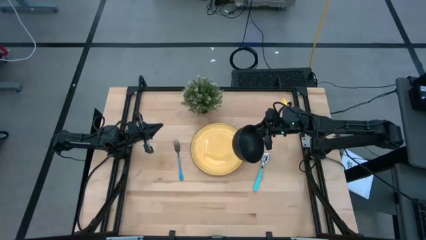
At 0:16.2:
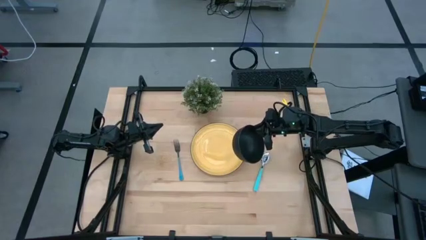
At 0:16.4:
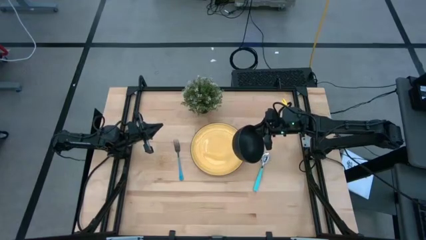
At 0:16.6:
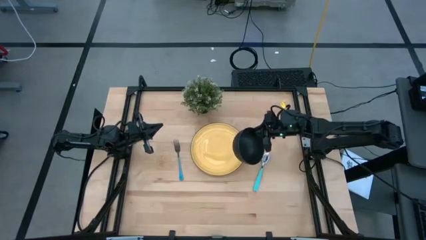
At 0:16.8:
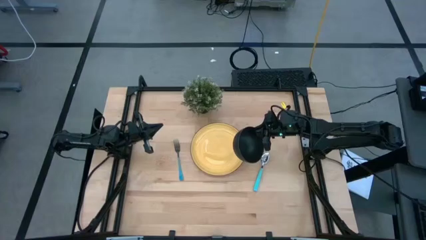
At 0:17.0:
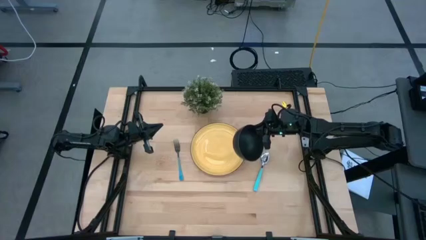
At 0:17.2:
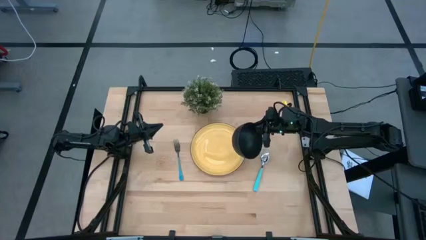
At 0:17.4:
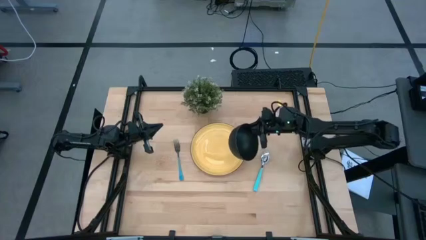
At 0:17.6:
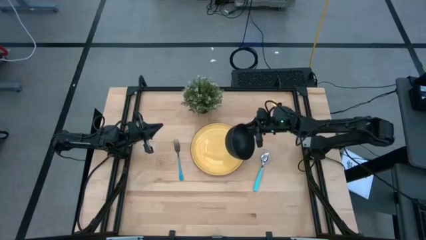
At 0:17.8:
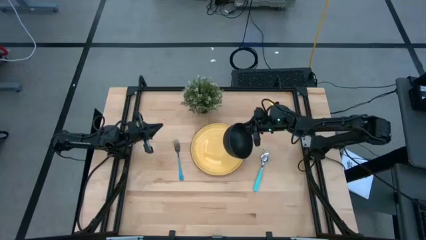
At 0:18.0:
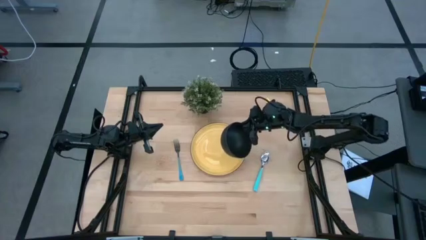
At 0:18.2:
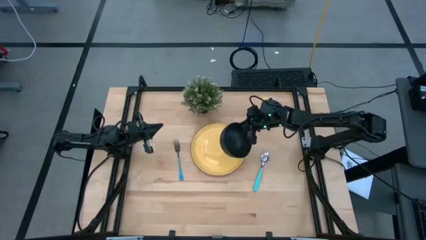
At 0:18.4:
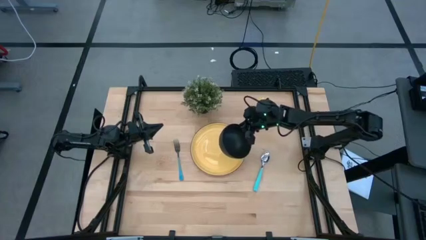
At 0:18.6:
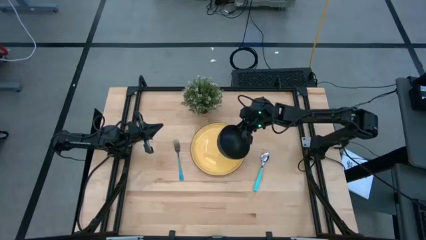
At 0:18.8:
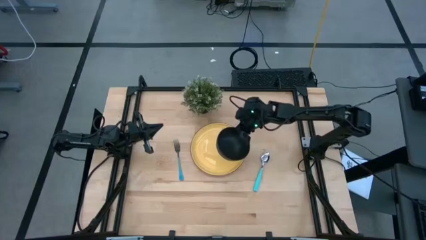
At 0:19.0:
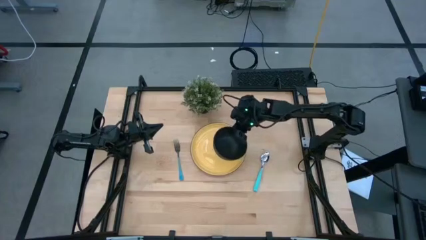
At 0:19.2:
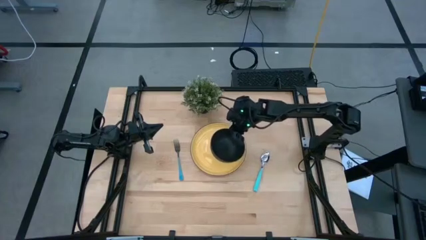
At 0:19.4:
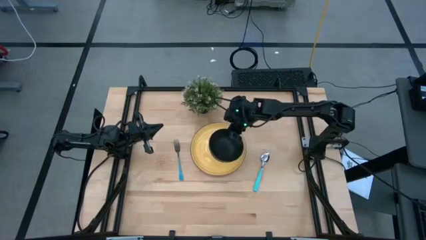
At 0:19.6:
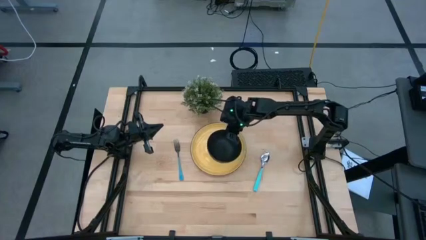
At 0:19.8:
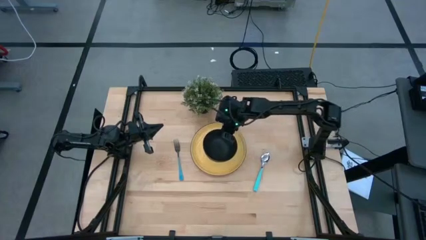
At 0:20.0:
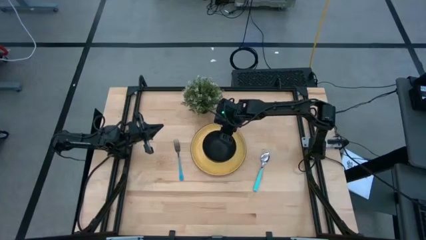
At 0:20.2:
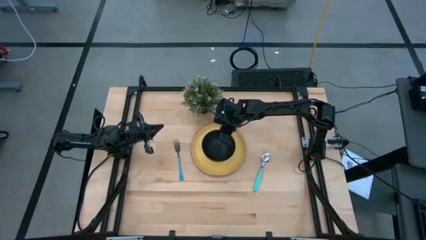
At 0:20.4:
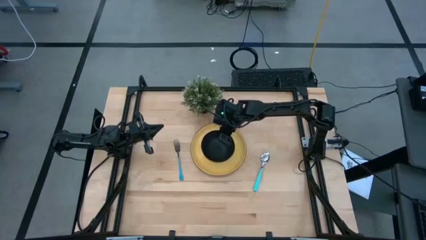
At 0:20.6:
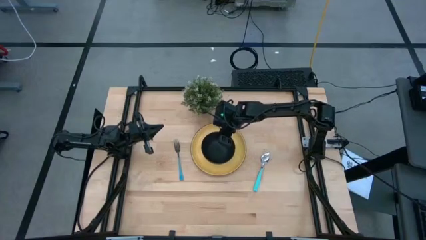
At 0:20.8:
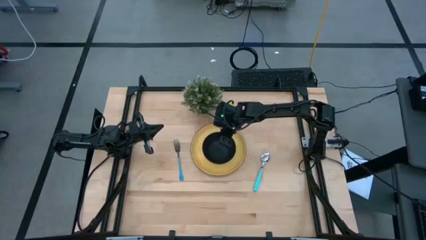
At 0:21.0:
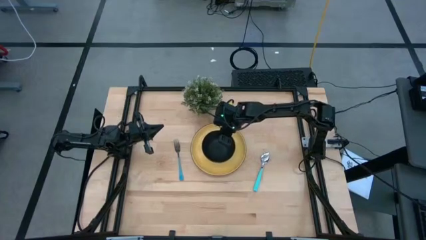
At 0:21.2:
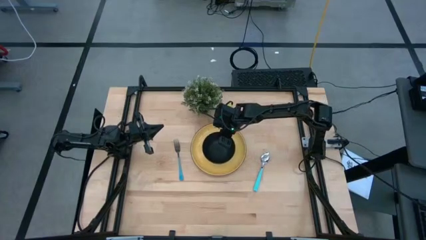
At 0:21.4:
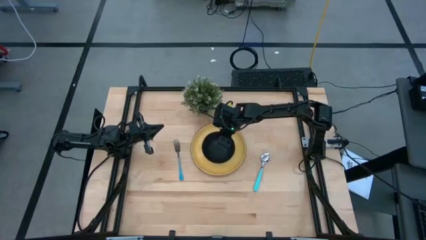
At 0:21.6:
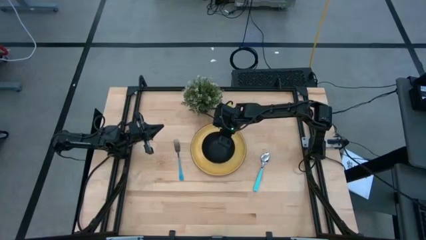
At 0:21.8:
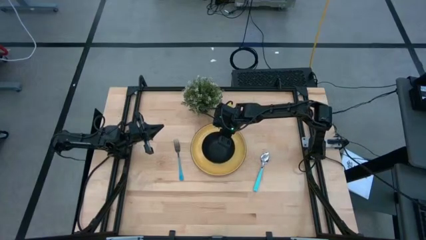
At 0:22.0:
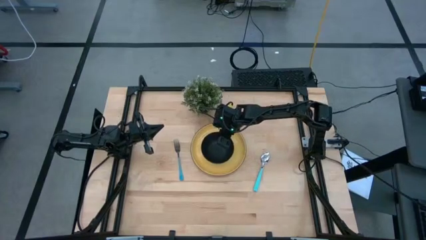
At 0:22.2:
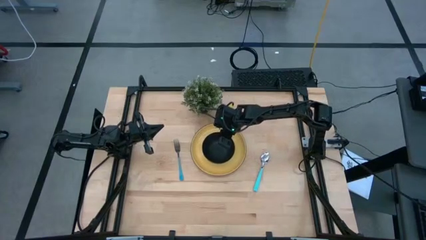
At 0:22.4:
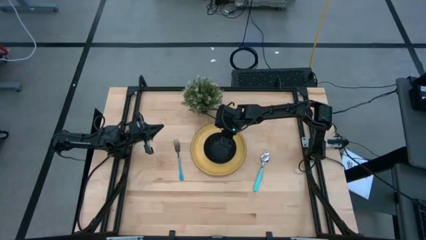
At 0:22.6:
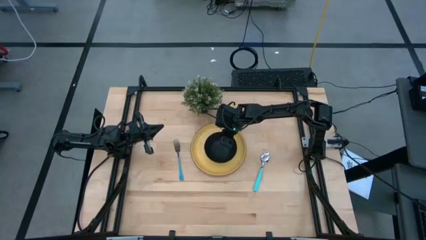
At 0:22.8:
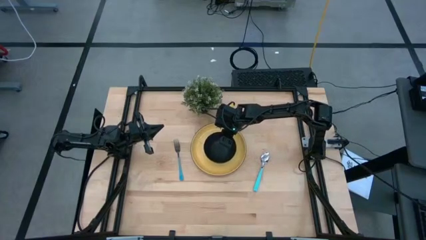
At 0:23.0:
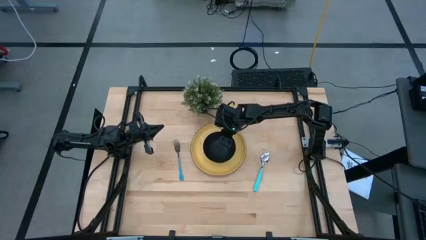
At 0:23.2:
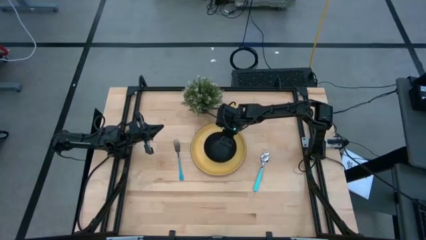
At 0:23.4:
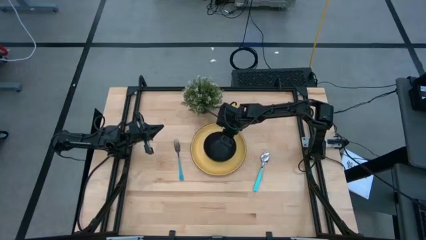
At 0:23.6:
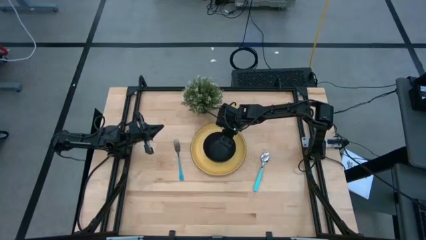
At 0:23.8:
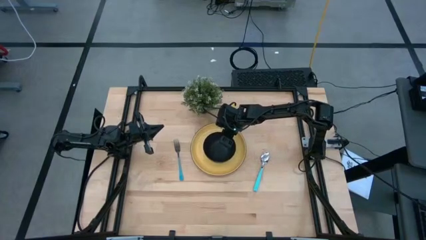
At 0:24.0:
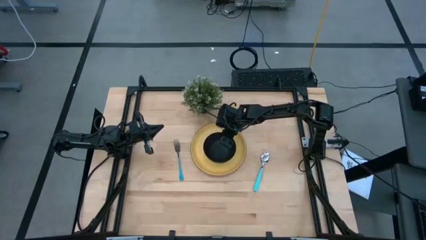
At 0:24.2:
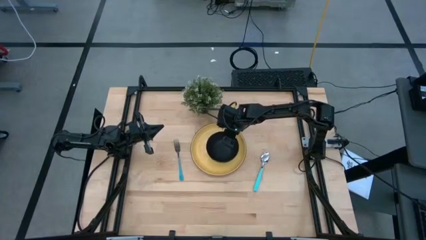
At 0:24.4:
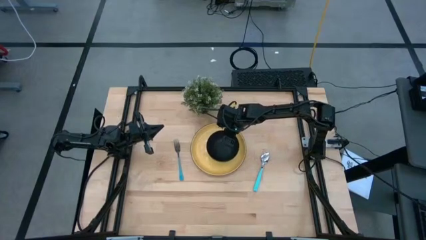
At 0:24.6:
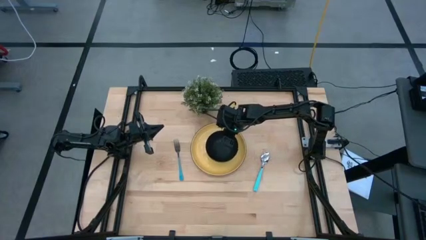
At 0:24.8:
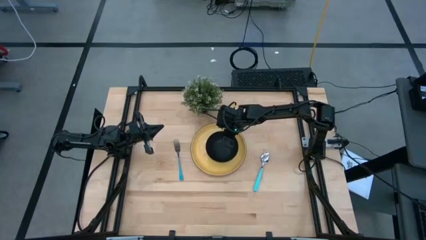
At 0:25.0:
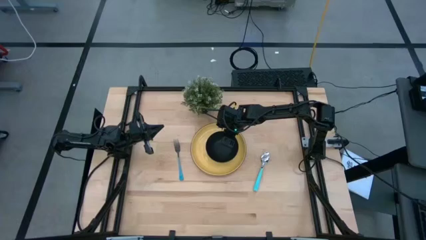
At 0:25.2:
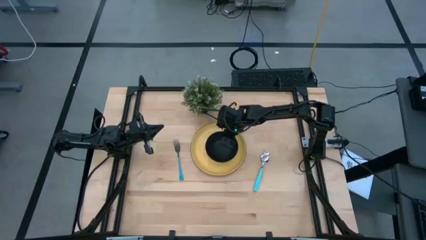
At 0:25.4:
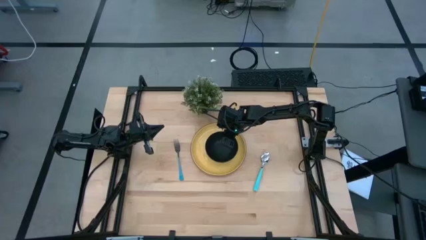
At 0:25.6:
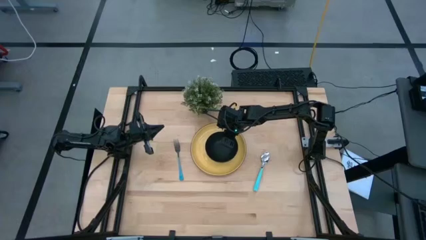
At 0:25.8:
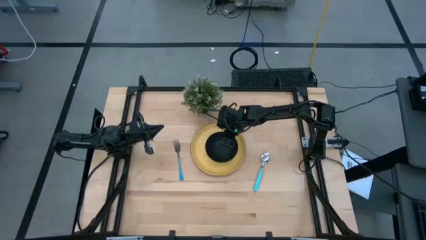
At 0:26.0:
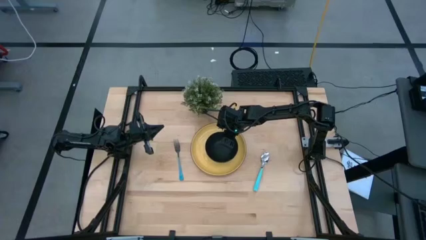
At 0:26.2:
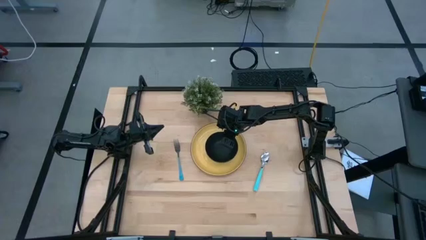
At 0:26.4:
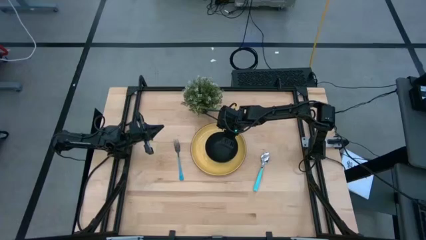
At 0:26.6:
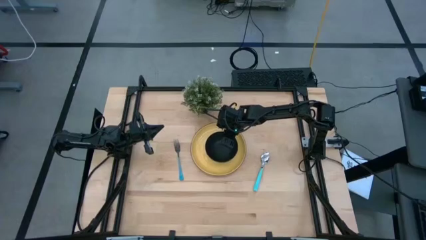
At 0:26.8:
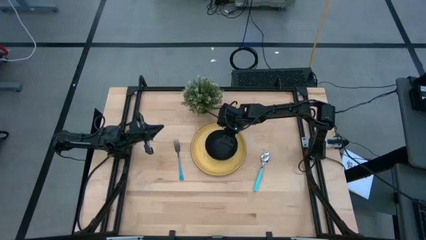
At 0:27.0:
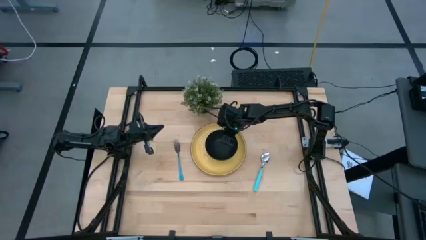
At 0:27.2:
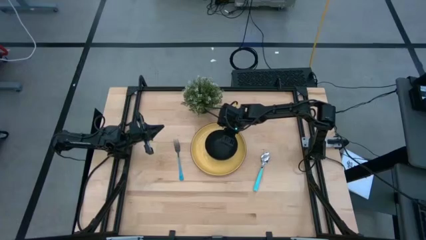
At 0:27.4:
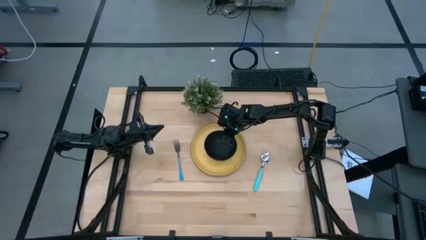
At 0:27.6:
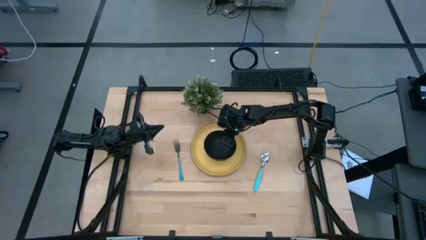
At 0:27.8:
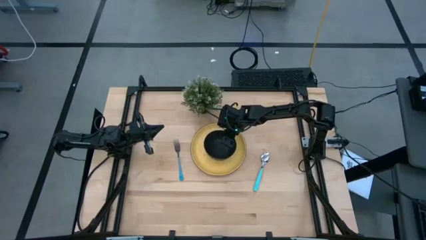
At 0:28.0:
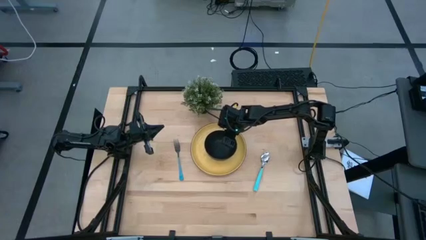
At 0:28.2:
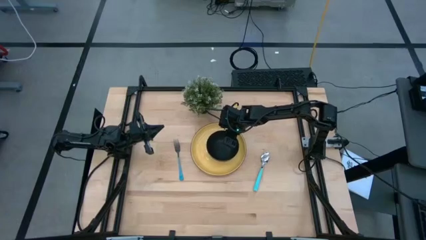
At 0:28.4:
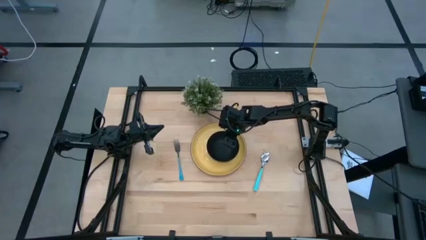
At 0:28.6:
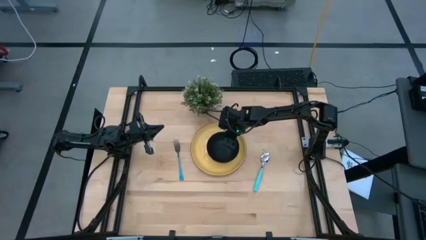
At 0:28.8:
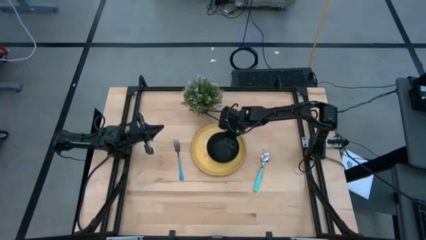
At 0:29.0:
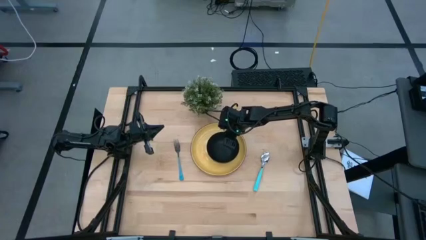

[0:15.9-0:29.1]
Task: Set table place
Put the black bowl on the yellow plate
